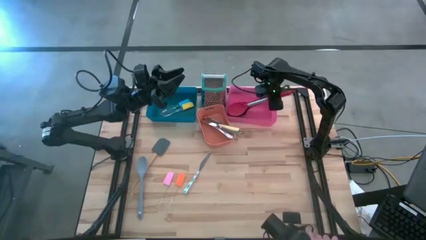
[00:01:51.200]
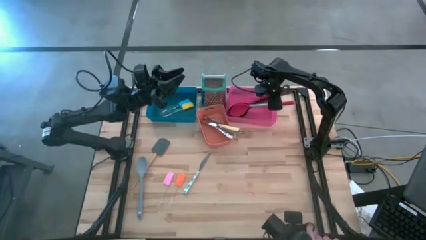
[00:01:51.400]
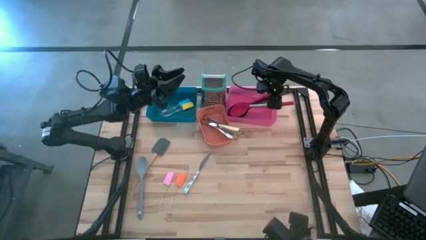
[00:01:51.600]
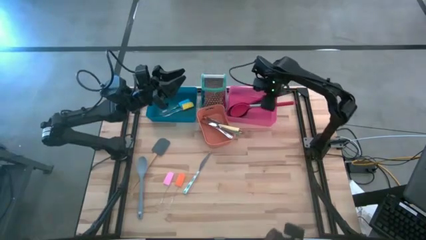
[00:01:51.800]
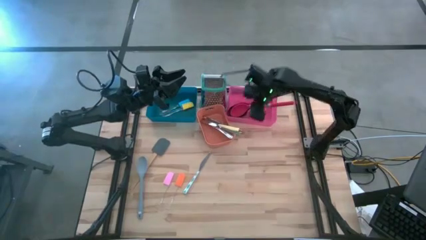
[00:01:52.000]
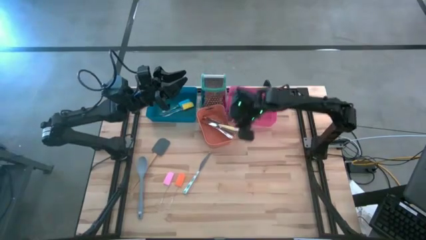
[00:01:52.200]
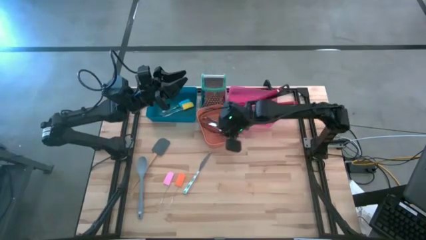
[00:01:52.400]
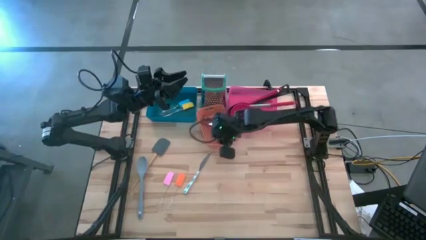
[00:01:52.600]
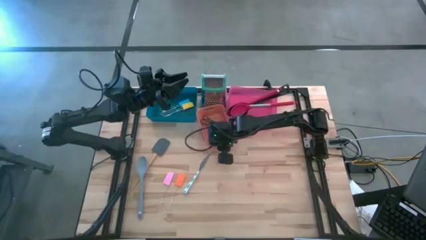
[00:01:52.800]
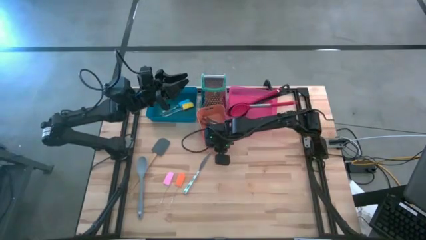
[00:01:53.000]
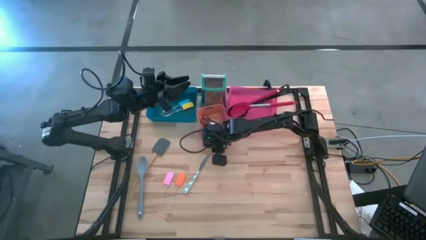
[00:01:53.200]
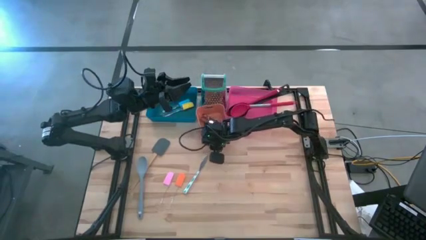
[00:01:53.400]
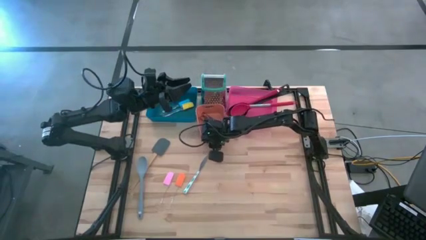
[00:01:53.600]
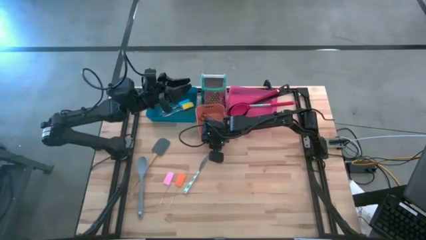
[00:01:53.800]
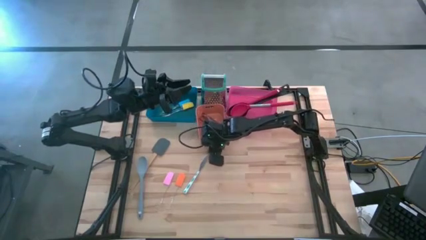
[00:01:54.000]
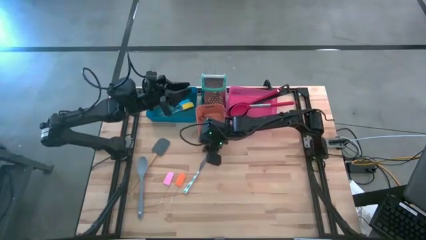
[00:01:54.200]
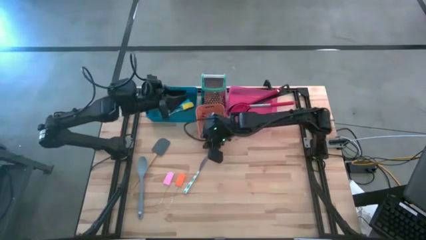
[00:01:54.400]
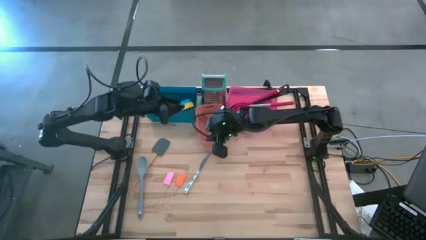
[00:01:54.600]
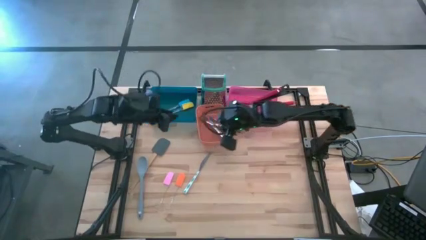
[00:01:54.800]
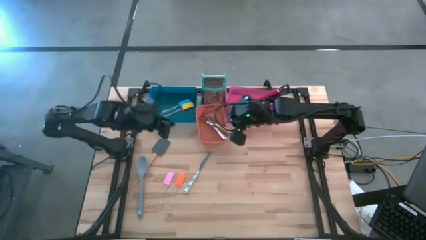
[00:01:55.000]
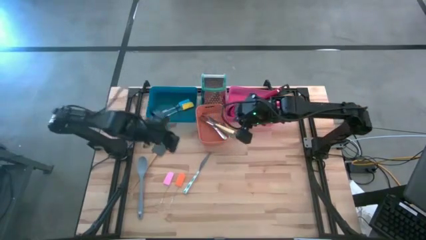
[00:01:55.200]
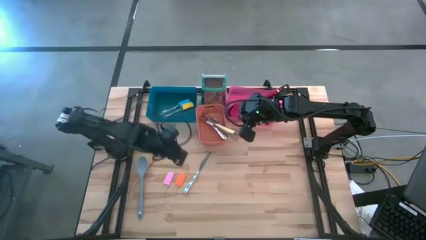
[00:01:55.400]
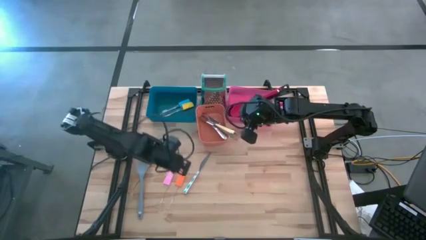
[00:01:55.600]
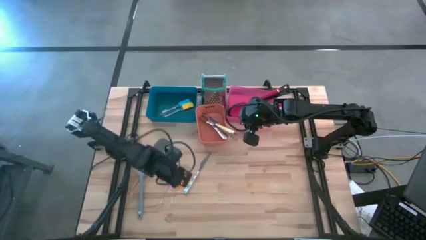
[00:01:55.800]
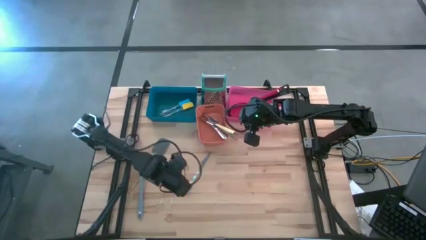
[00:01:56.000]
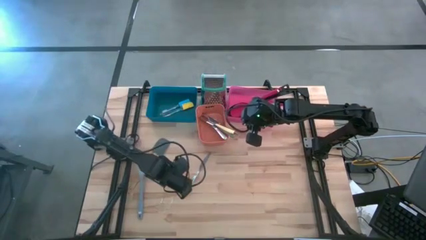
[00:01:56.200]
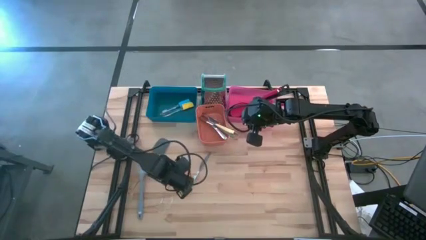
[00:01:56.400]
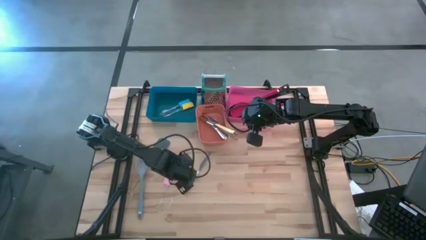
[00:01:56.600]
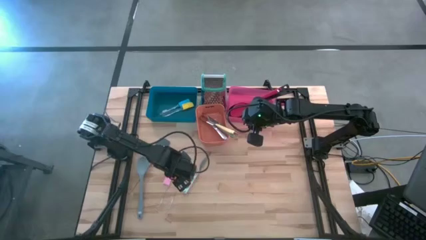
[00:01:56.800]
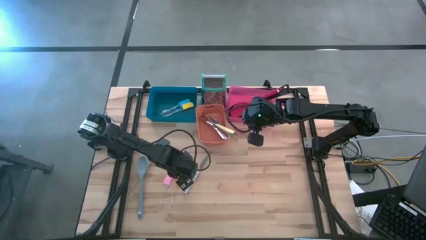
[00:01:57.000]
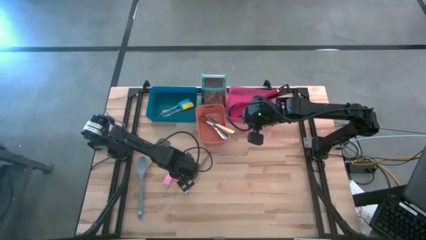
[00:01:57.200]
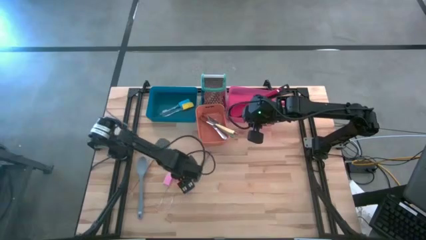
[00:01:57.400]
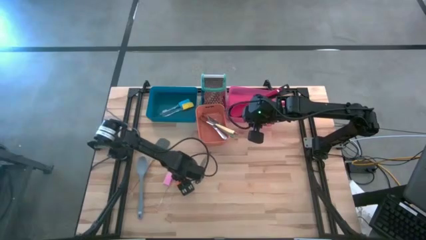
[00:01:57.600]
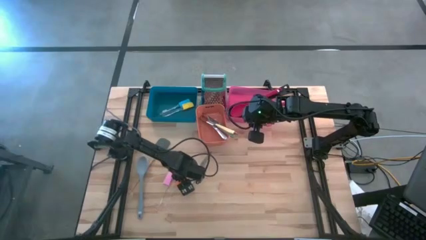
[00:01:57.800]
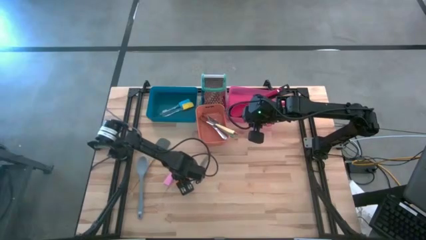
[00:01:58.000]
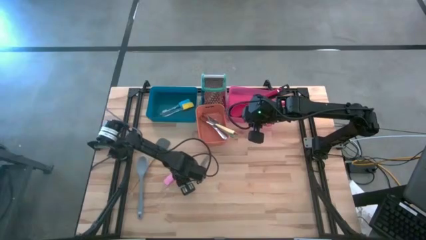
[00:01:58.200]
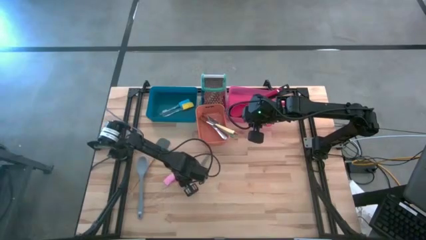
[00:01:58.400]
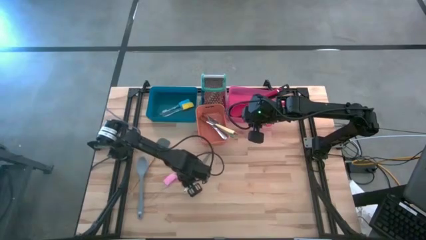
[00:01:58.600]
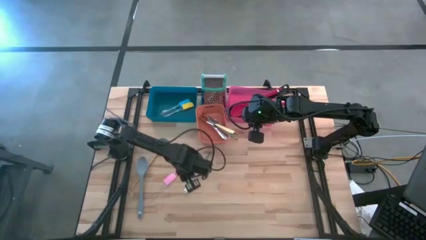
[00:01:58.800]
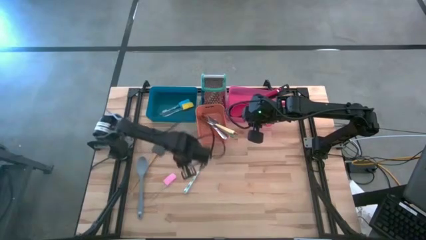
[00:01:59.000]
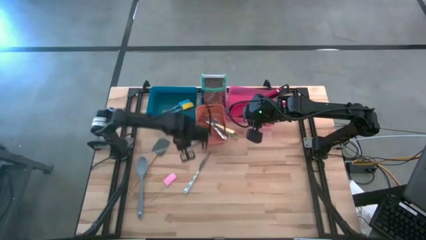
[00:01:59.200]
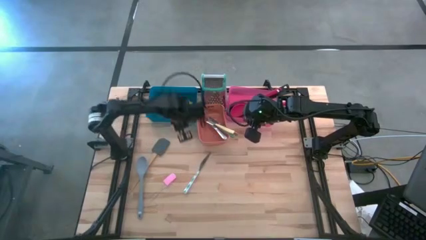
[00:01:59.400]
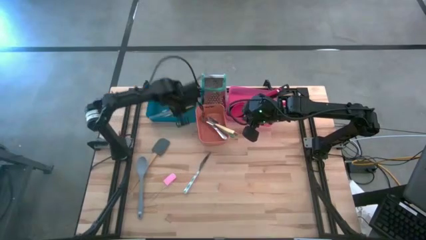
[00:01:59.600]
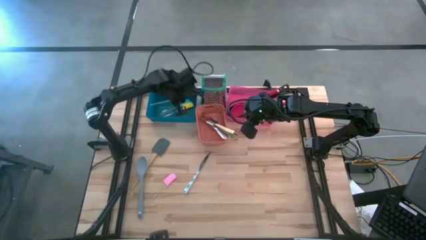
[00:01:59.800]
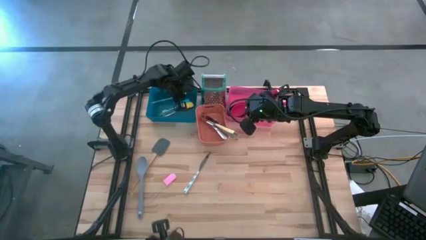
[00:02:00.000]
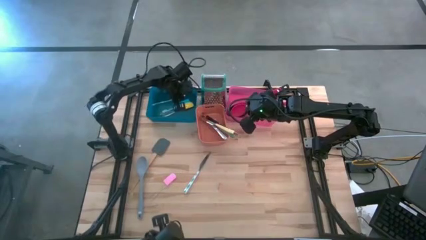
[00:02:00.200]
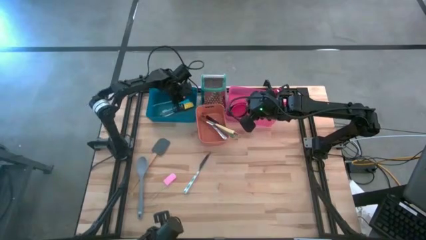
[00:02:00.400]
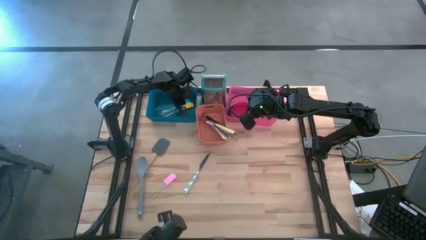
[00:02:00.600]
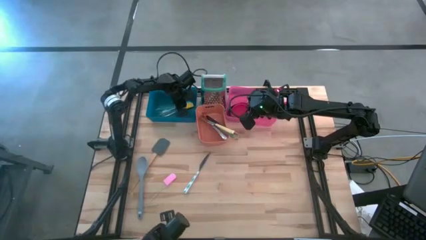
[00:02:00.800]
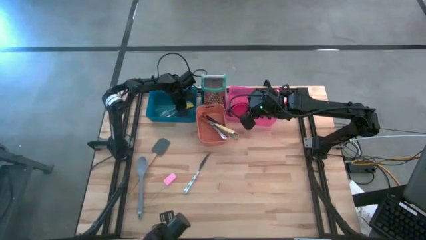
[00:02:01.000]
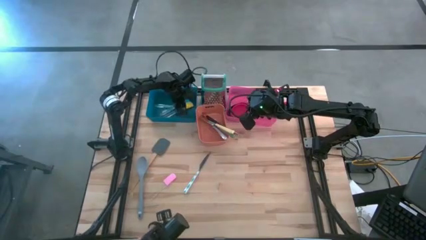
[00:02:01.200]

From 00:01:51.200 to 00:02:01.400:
Task: Pick & Place Kitchen Items
Put the orange spatula into the blue bin
